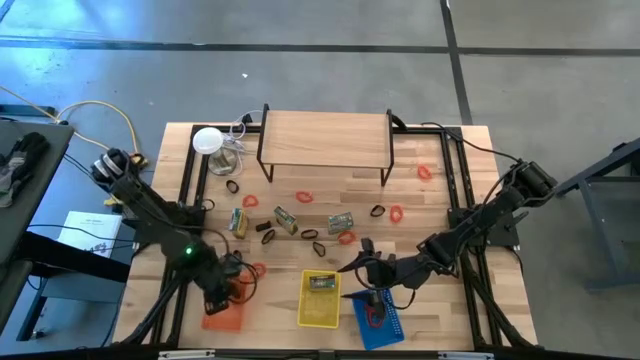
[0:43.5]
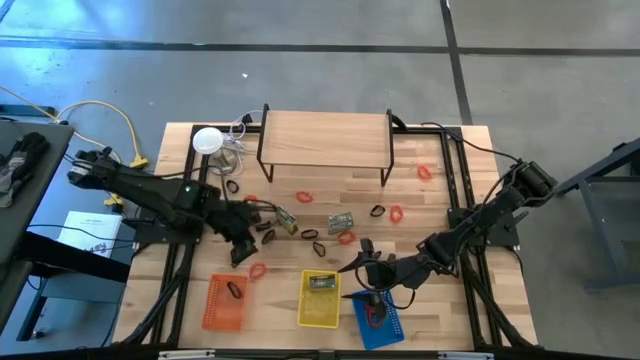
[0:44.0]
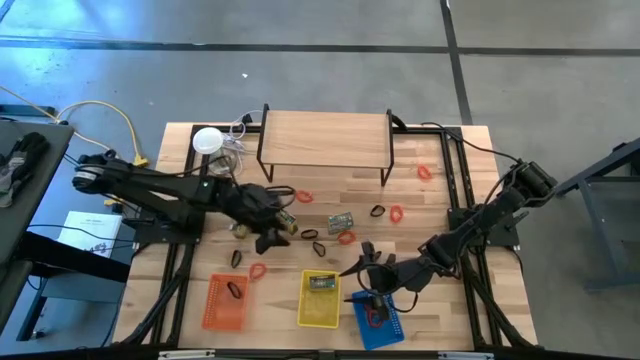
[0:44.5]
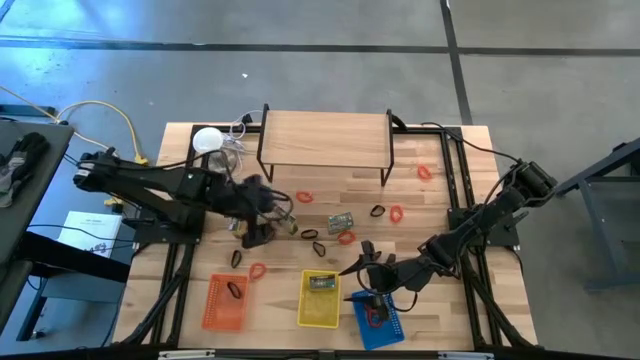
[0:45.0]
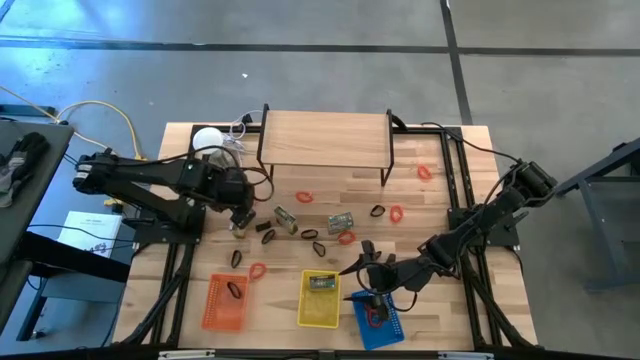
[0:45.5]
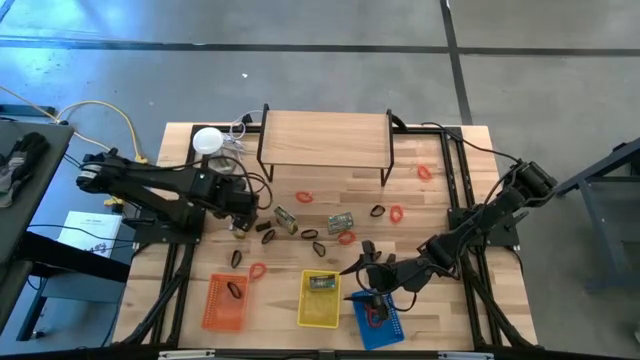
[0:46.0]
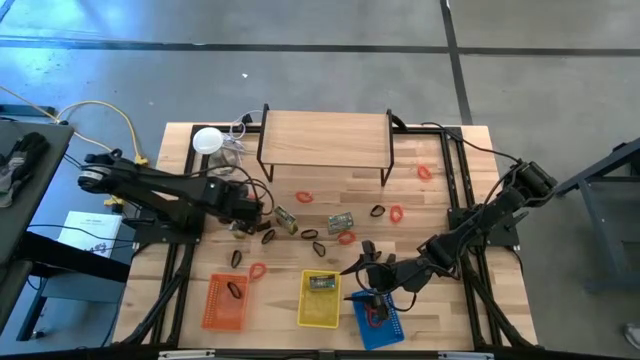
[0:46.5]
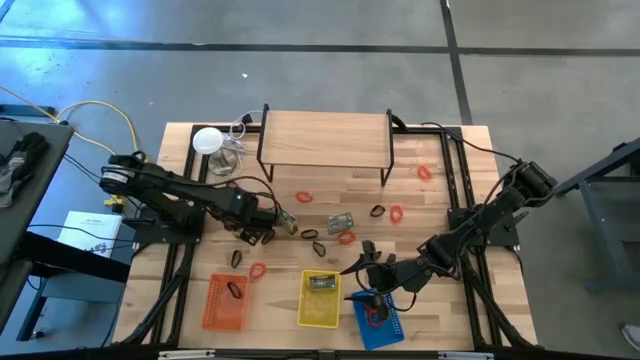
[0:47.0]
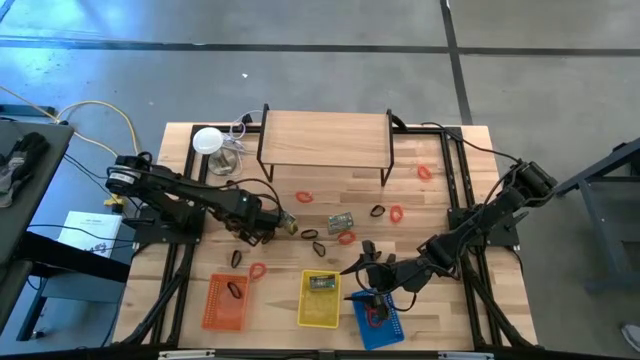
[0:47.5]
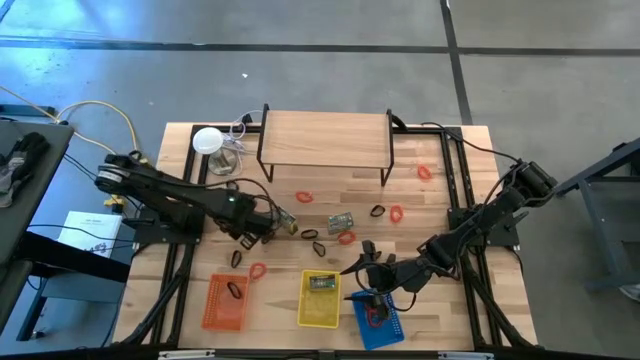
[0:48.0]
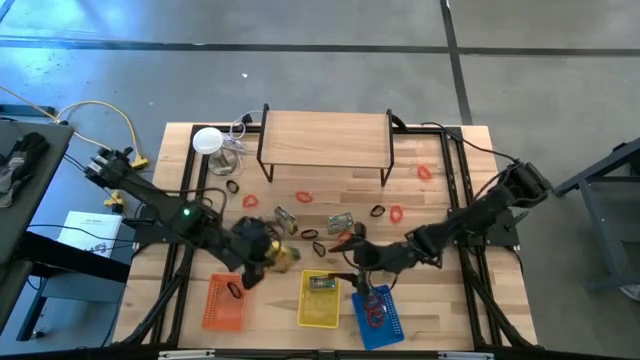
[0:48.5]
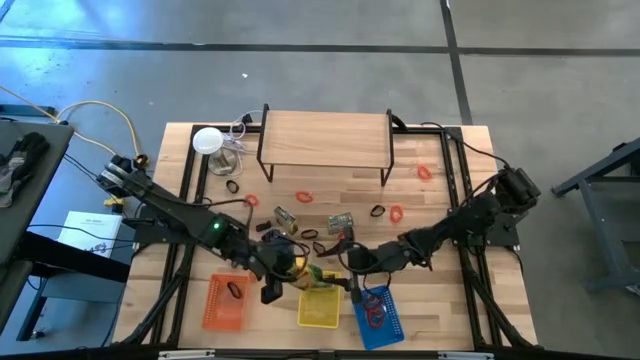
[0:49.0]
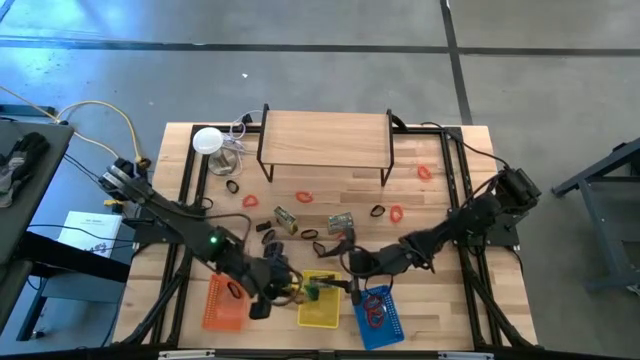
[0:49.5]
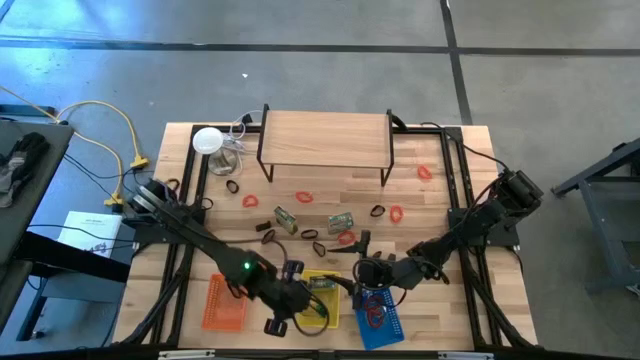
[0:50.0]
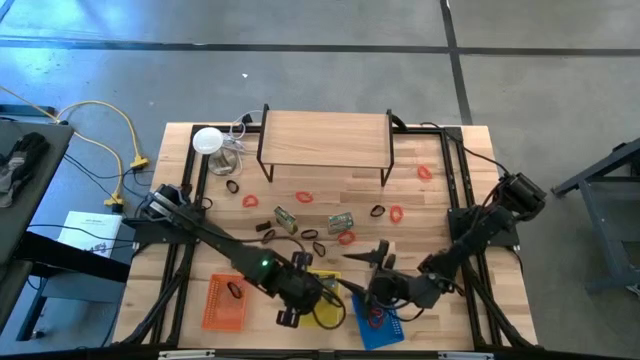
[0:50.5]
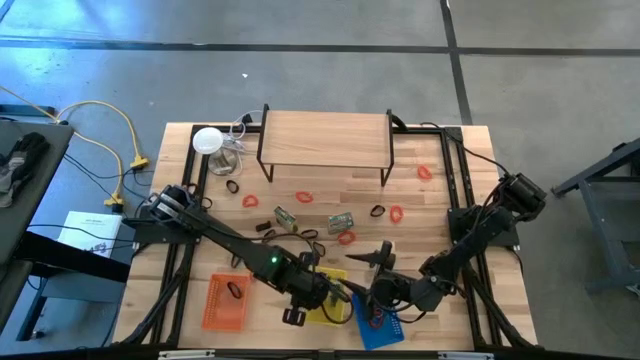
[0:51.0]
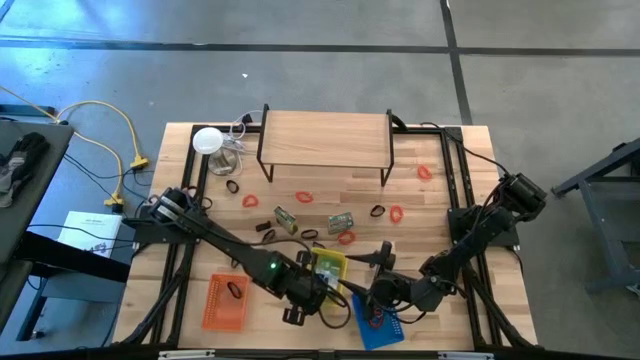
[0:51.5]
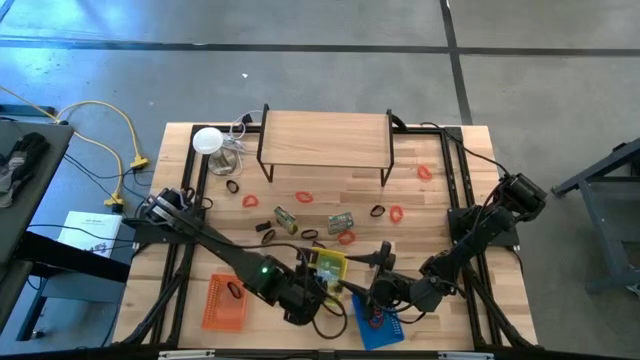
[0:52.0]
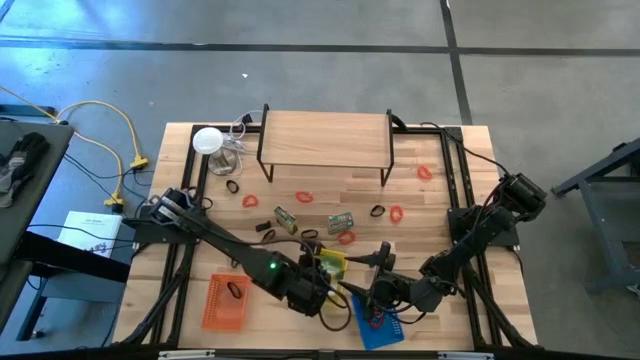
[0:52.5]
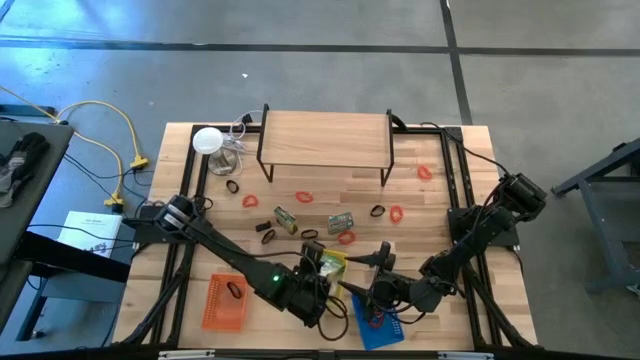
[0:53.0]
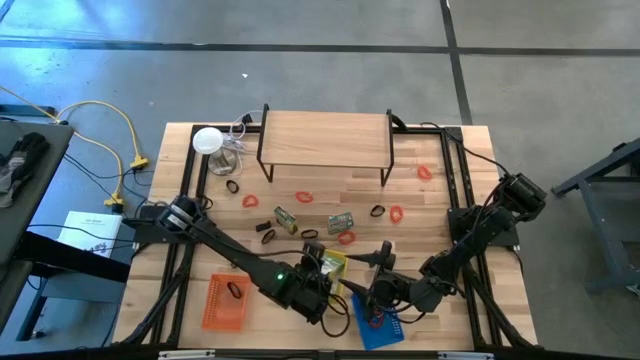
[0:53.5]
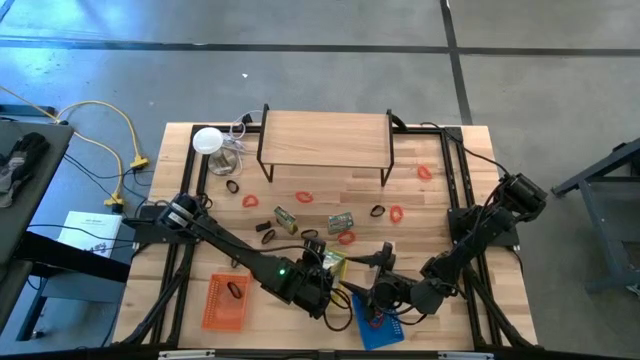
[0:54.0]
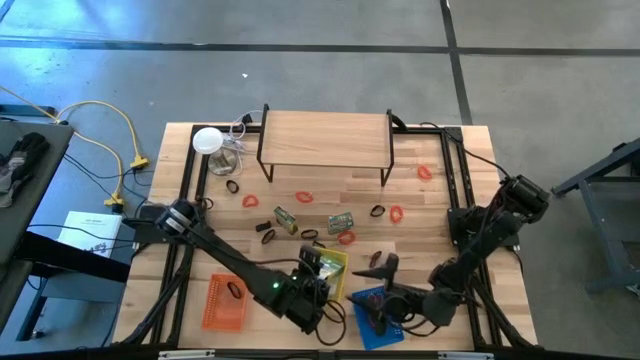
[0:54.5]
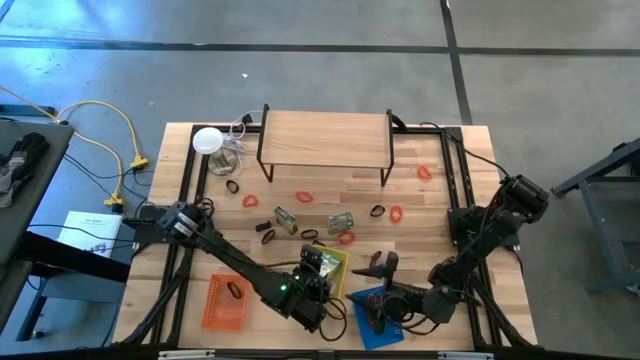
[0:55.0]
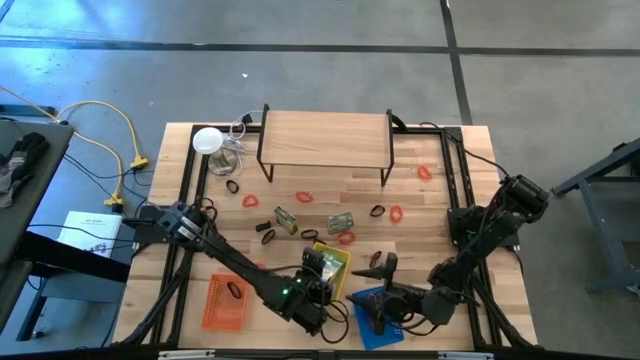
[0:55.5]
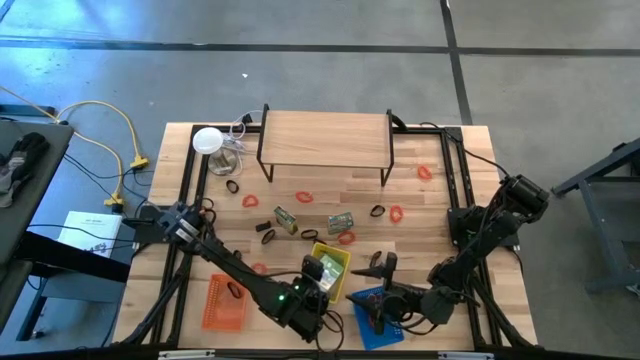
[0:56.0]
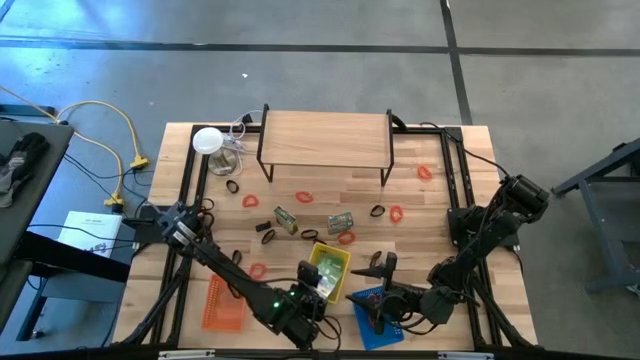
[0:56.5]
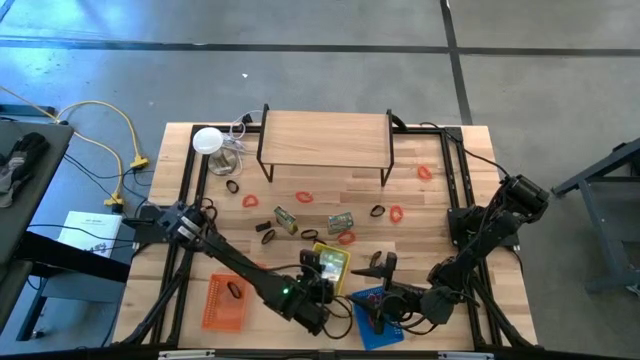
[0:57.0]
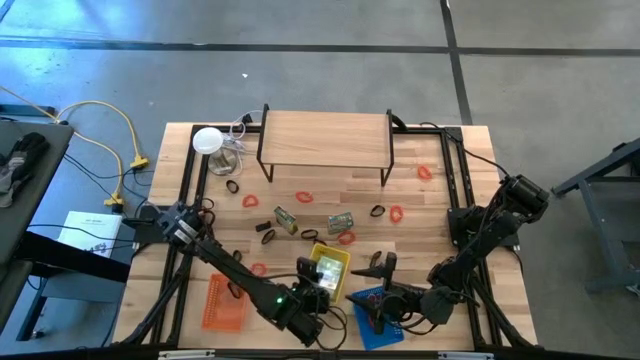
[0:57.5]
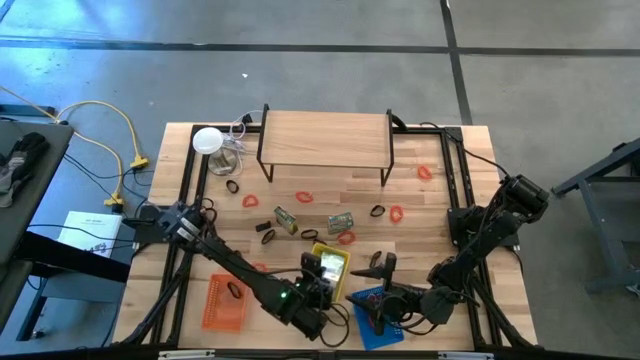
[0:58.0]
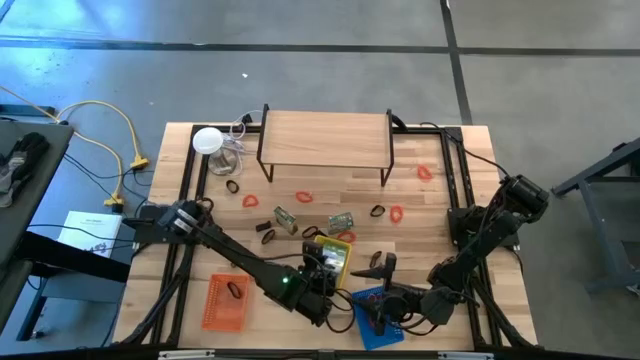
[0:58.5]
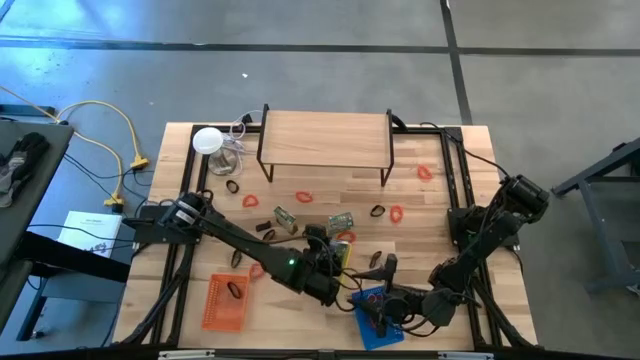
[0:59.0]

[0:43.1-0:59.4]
Task: Pick & Place Office Desk Supplies
Put the left yellow crayon box into the yellow box

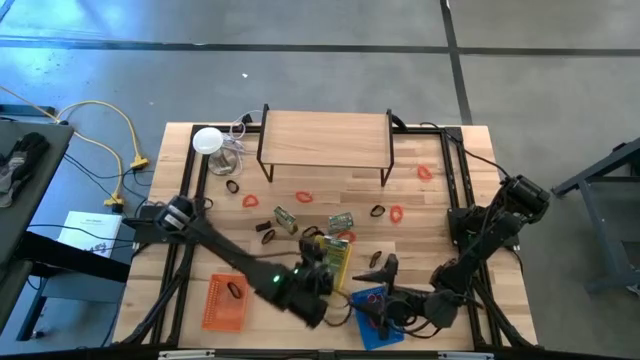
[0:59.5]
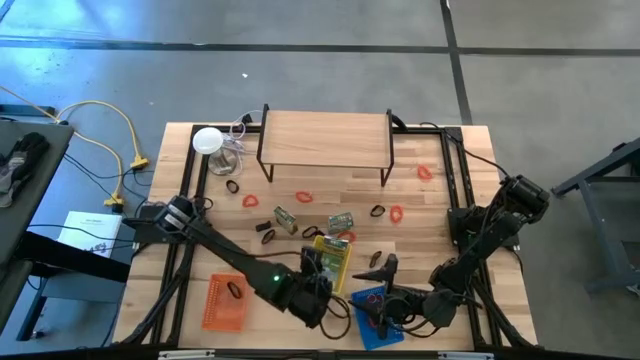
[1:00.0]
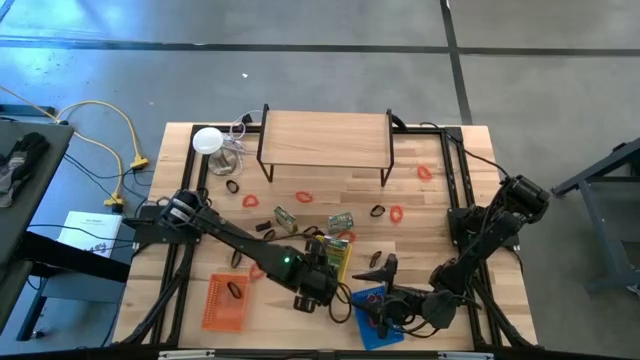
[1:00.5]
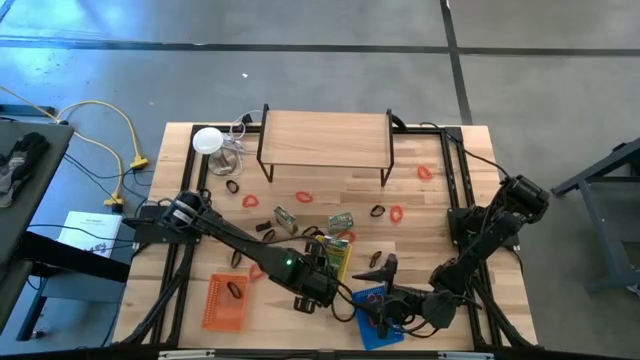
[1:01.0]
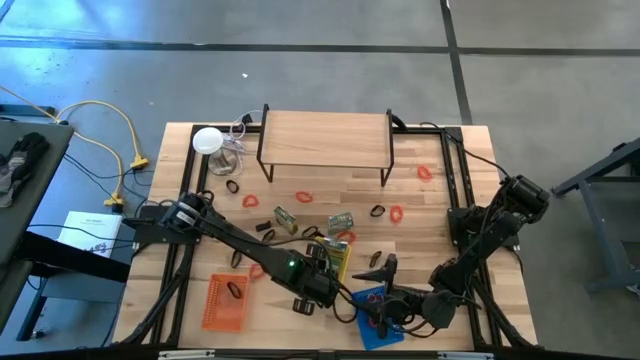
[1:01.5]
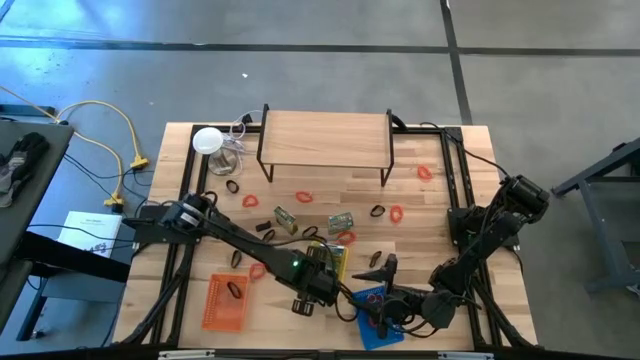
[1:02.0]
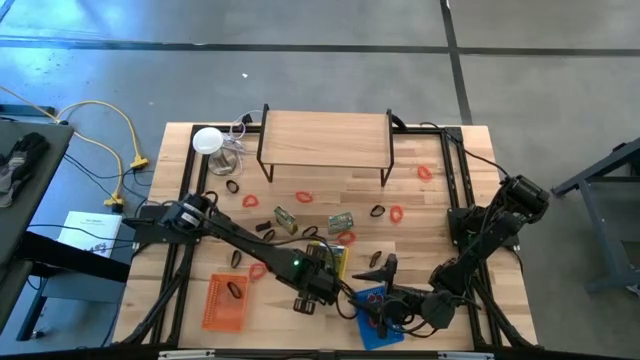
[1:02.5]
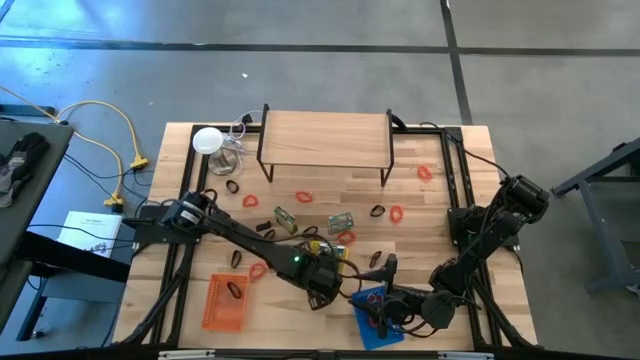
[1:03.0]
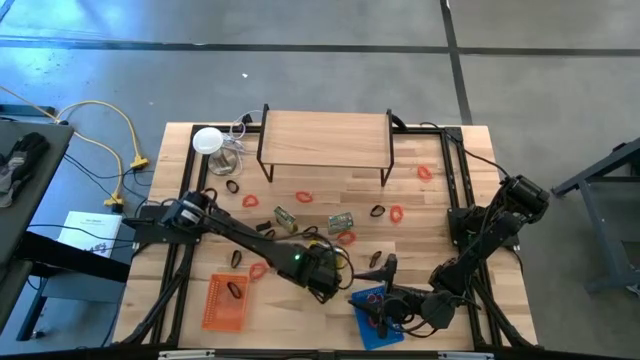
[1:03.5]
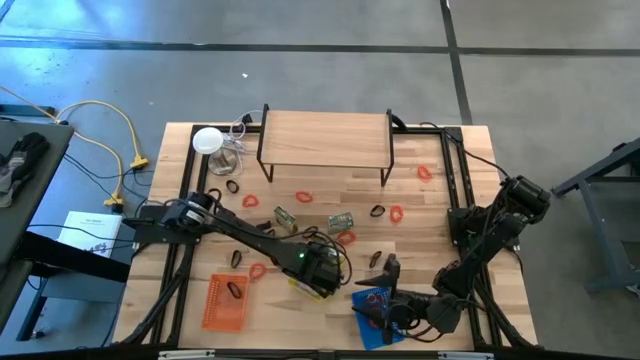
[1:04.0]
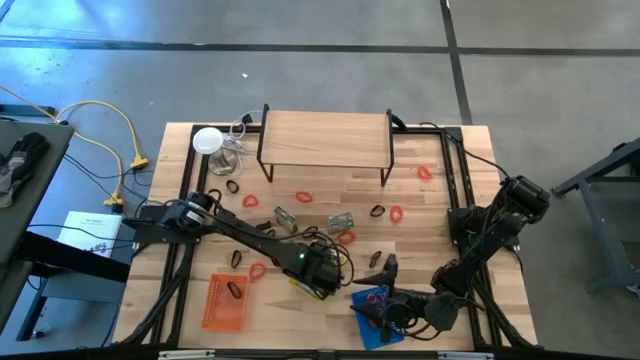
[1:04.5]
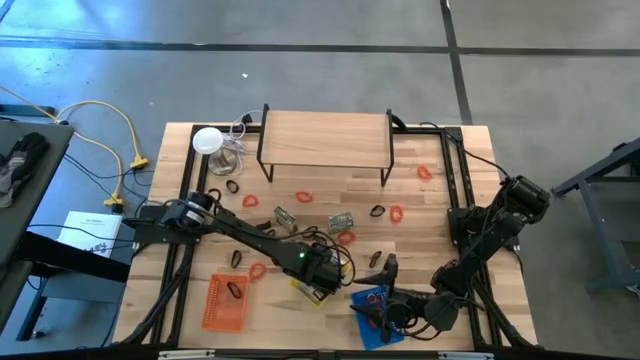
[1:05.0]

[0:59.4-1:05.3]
Adjust the yellow crayon box in the yellow box
